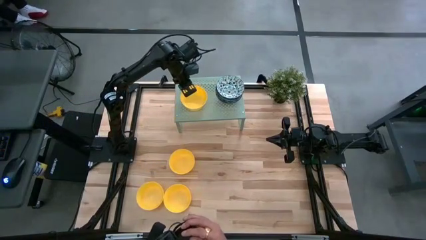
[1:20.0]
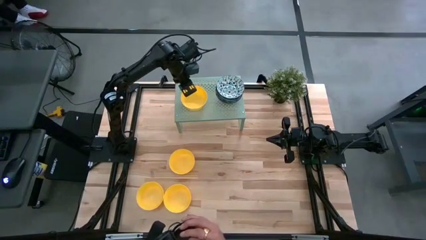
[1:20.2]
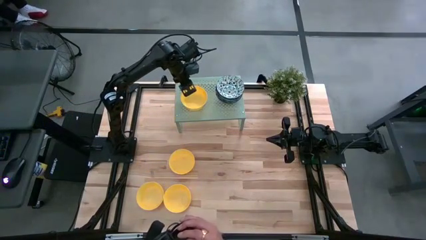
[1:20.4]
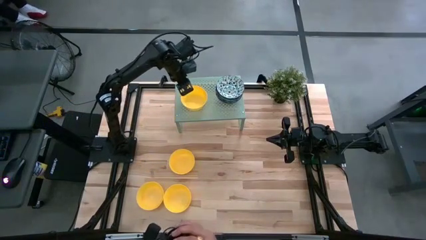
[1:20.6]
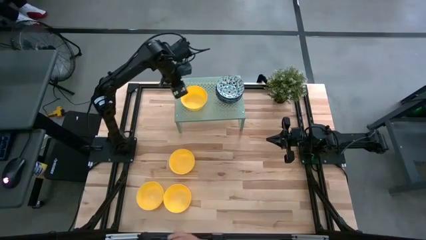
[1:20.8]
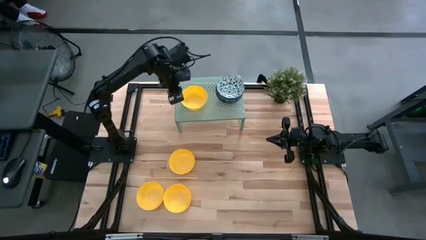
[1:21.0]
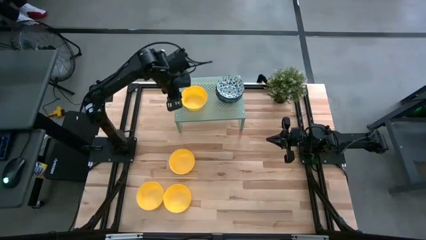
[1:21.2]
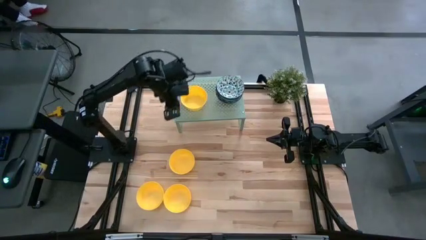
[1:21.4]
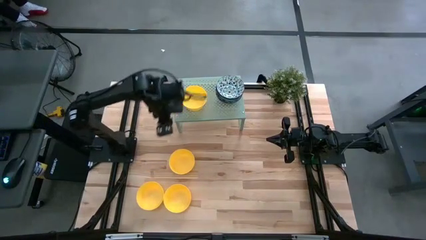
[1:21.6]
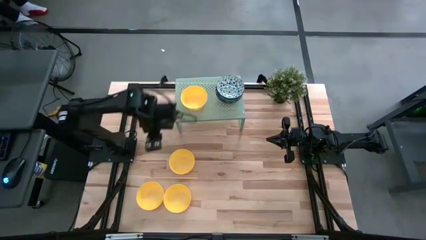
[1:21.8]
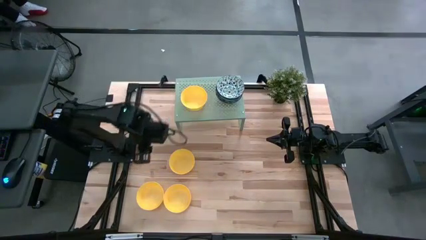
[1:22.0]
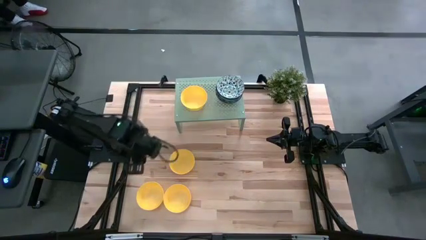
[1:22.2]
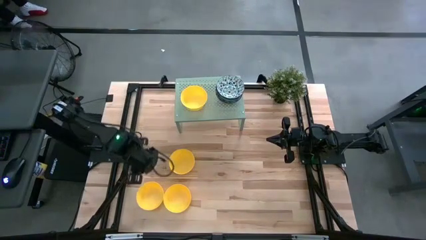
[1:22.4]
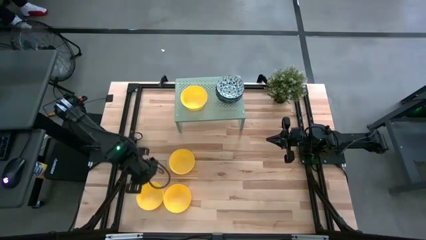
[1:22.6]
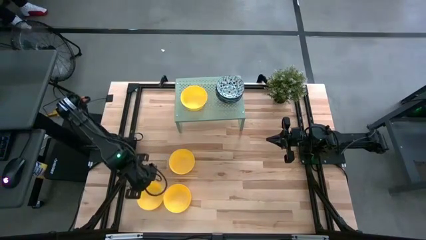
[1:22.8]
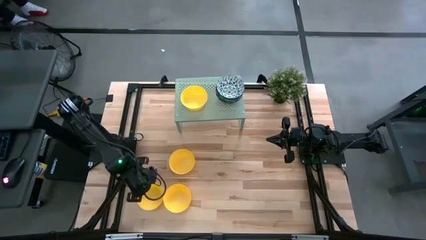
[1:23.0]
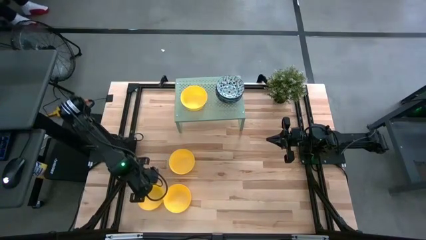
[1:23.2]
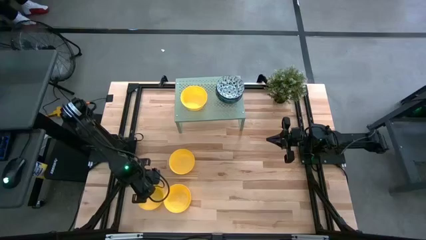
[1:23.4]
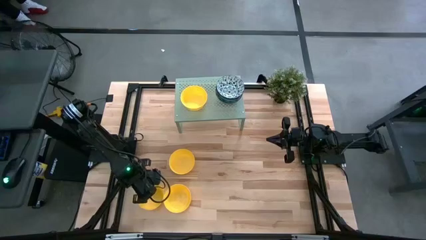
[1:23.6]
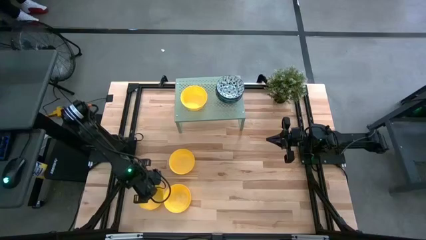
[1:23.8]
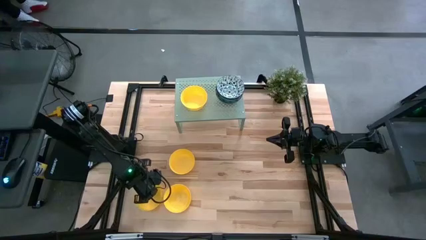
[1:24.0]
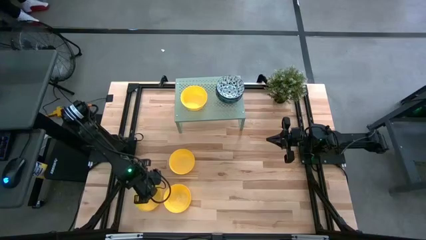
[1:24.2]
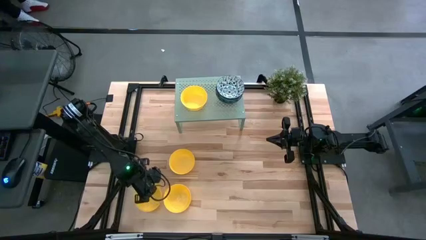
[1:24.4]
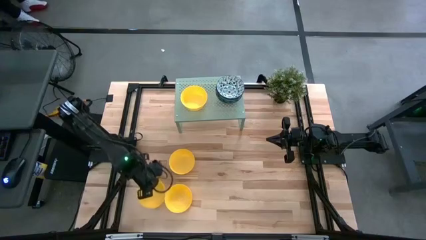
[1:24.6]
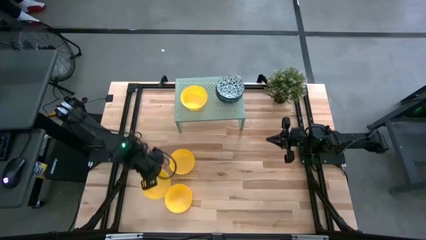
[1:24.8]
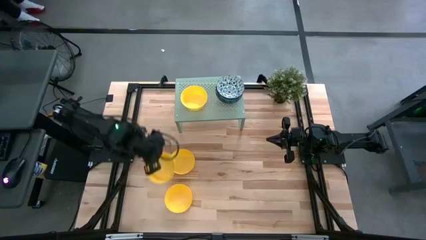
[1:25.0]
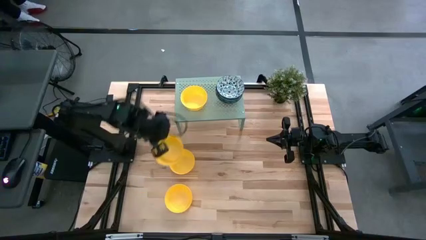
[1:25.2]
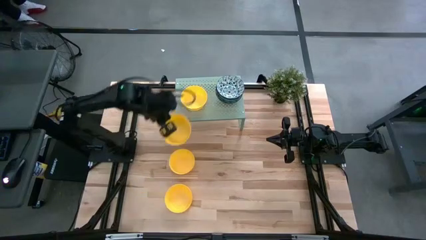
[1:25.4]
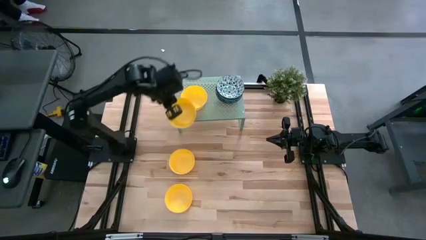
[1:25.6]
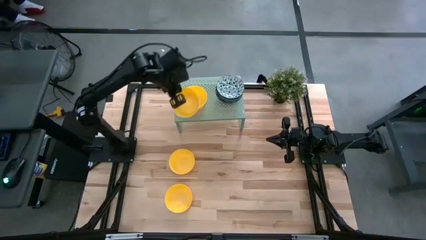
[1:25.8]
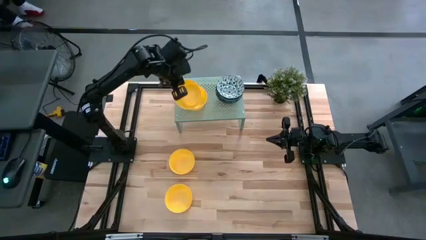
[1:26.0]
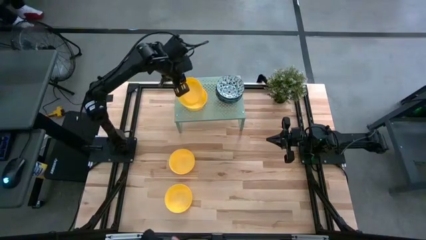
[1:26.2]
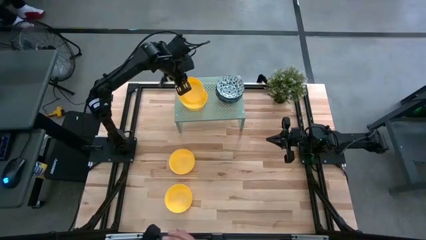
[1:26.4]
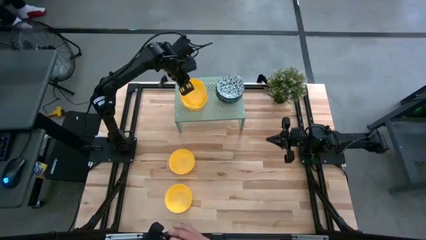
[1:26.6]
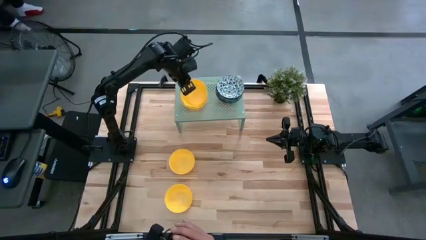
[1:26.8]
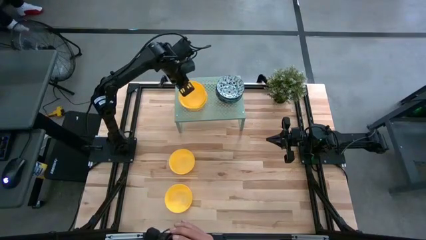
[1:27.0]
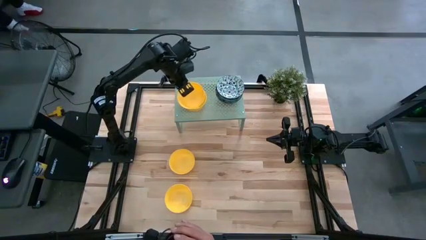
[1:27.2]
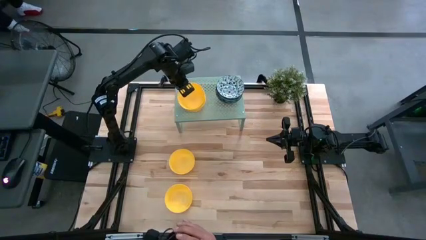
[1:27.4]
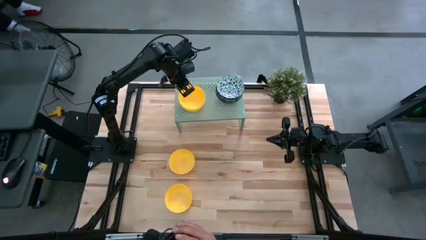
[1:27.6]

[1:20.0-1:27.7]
Task: Pick & Place Mini bowls
Stack the yellow bowl on top of the other yellow bowl on the shelf

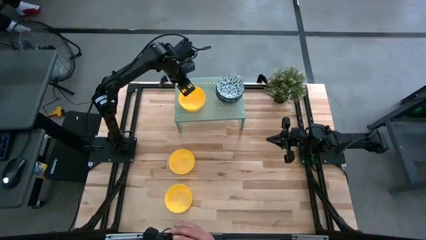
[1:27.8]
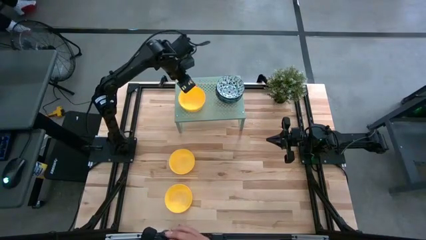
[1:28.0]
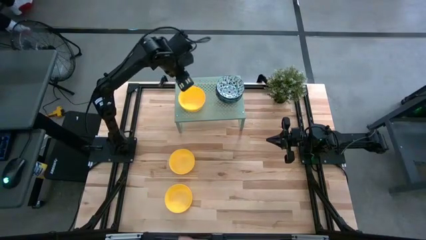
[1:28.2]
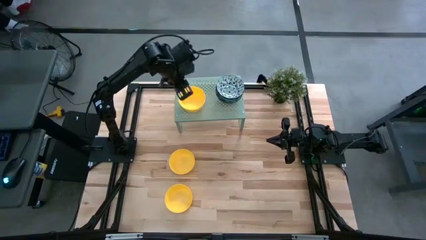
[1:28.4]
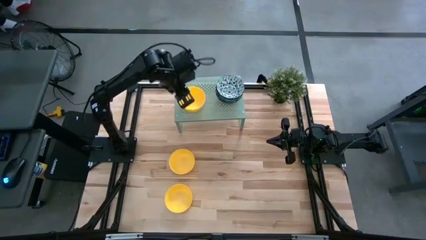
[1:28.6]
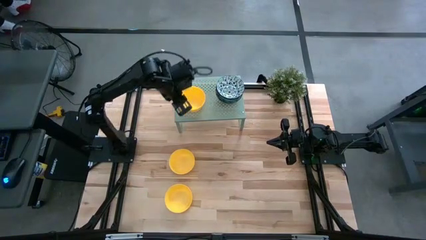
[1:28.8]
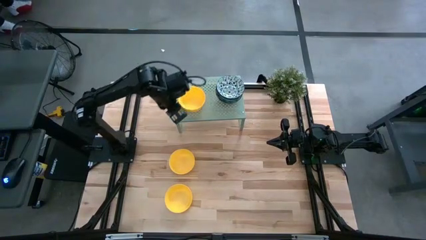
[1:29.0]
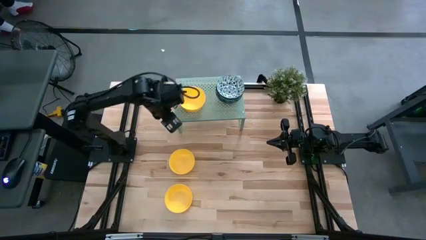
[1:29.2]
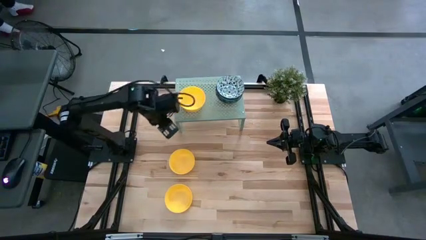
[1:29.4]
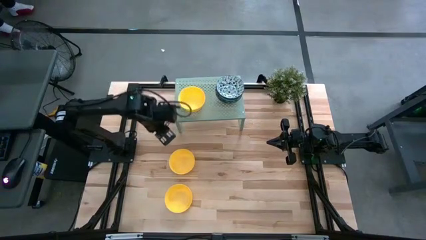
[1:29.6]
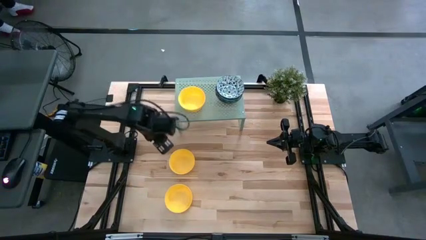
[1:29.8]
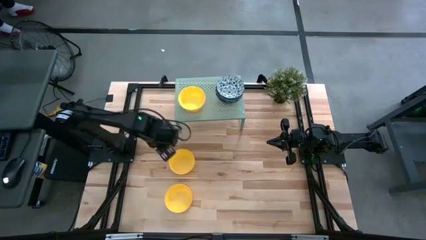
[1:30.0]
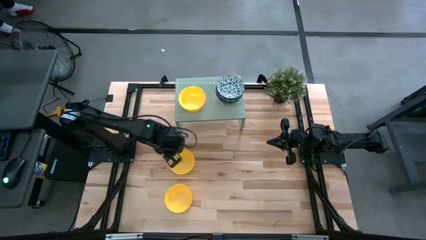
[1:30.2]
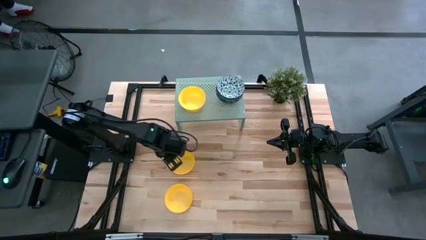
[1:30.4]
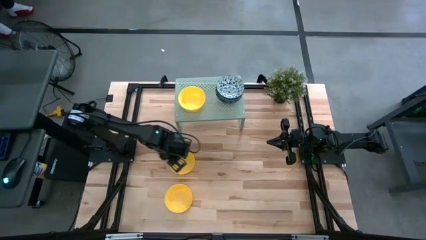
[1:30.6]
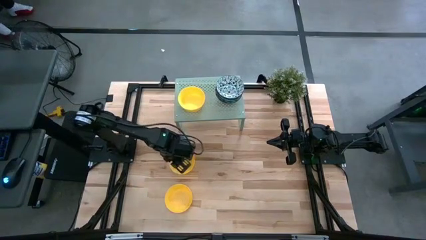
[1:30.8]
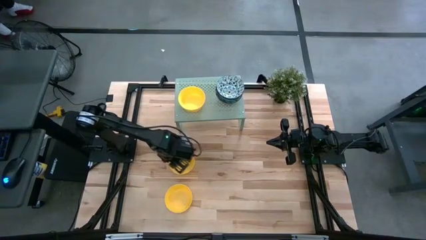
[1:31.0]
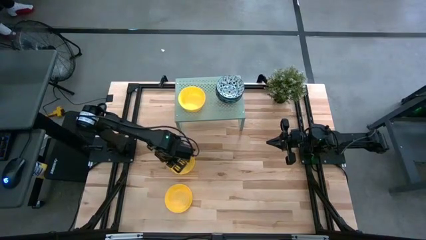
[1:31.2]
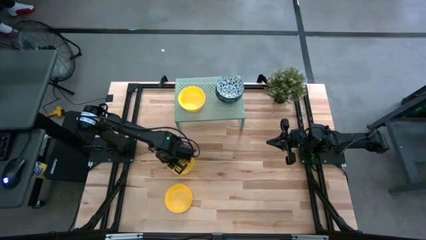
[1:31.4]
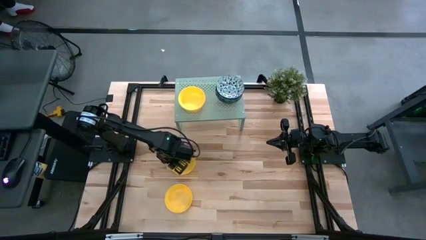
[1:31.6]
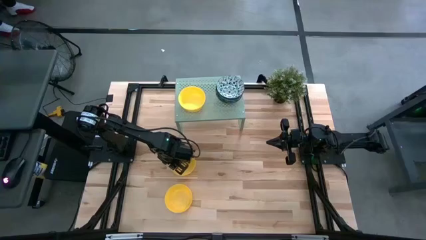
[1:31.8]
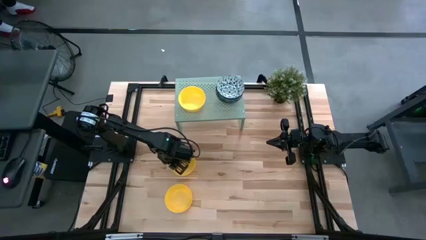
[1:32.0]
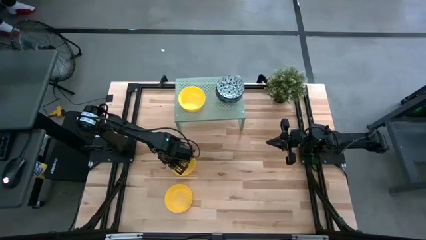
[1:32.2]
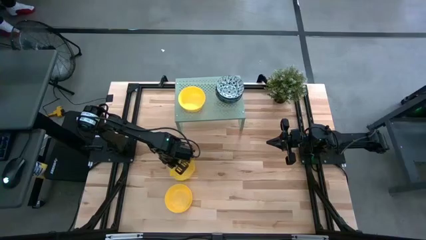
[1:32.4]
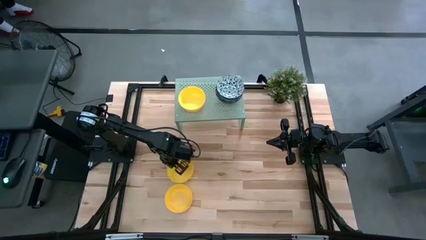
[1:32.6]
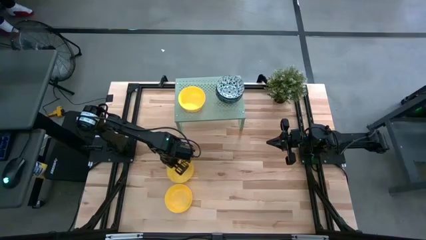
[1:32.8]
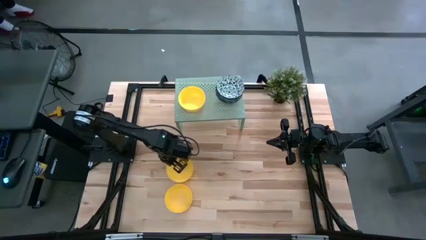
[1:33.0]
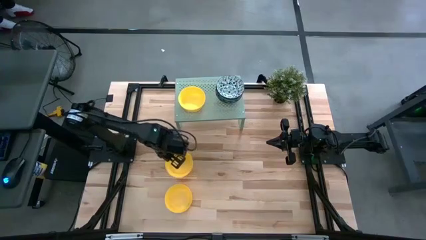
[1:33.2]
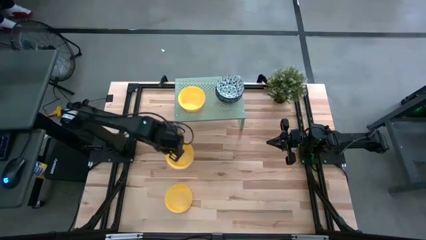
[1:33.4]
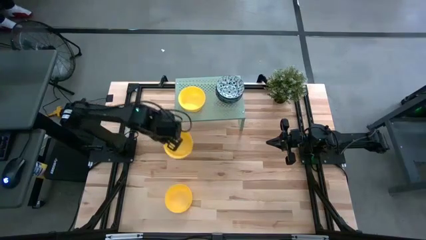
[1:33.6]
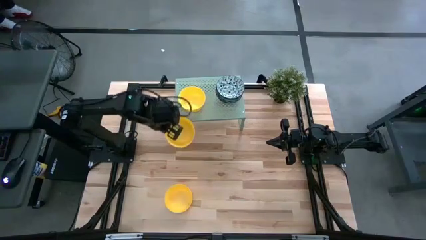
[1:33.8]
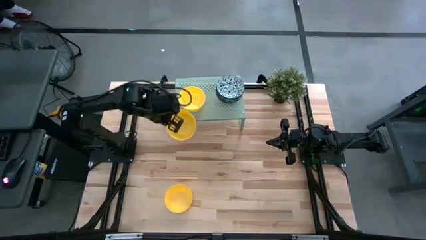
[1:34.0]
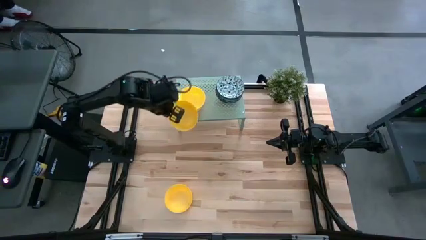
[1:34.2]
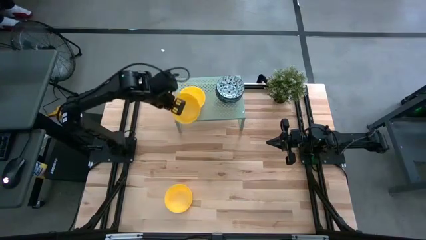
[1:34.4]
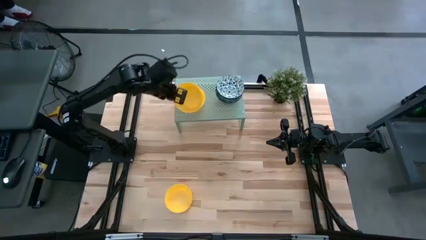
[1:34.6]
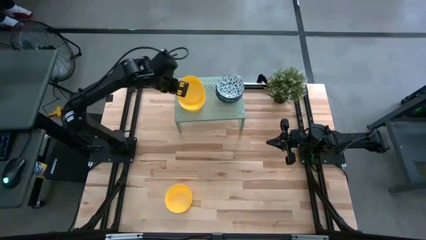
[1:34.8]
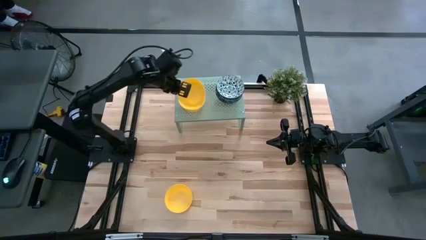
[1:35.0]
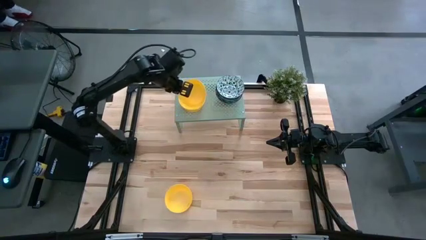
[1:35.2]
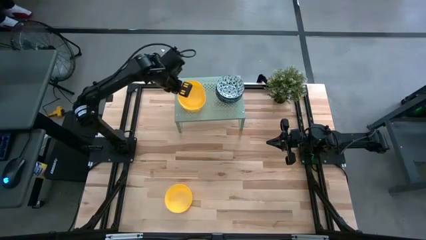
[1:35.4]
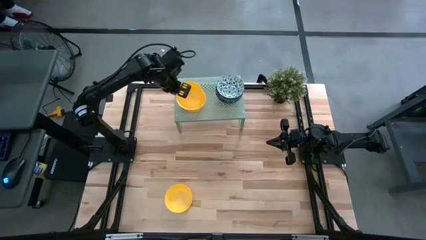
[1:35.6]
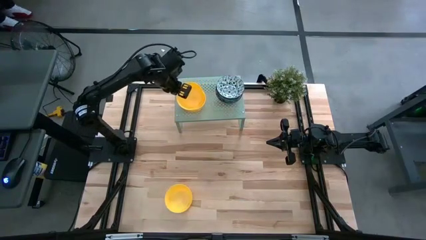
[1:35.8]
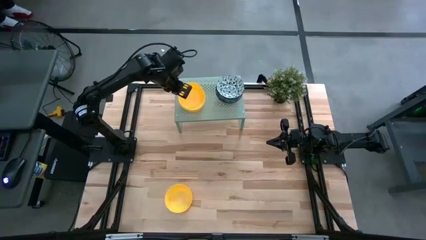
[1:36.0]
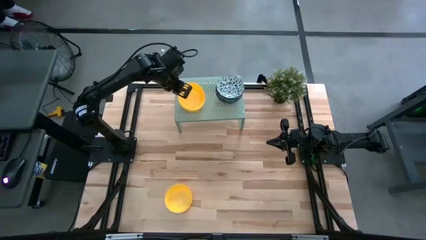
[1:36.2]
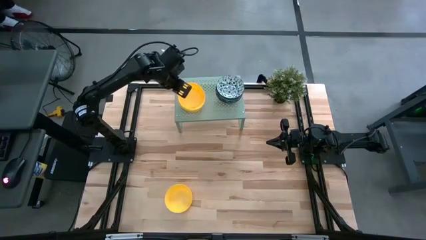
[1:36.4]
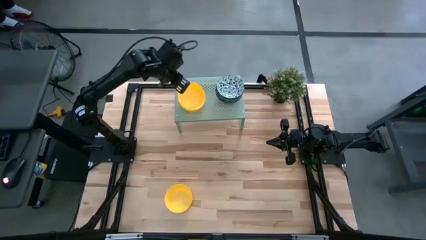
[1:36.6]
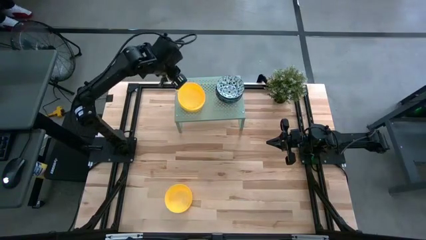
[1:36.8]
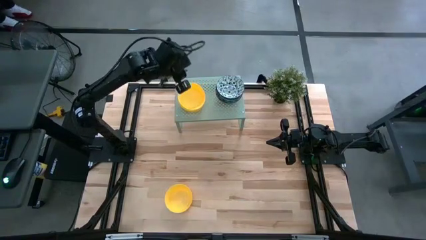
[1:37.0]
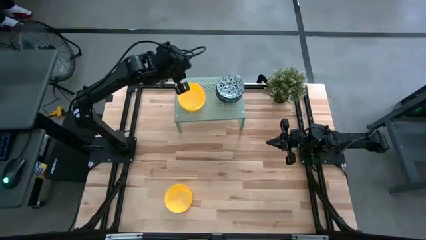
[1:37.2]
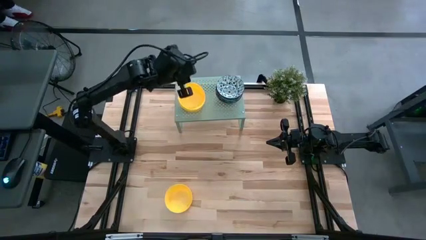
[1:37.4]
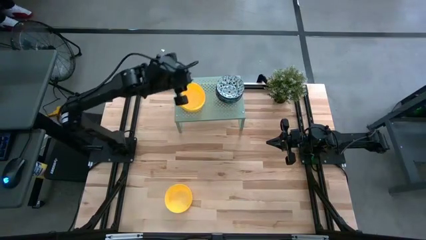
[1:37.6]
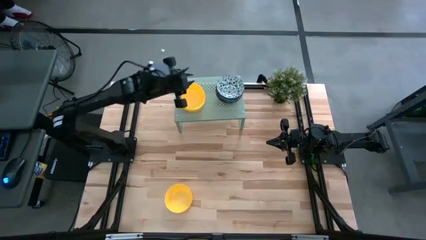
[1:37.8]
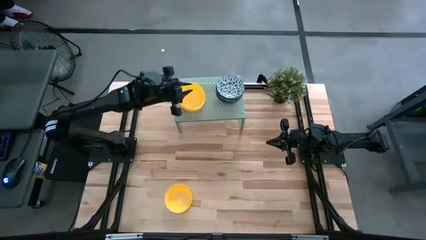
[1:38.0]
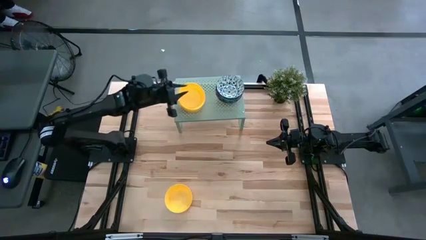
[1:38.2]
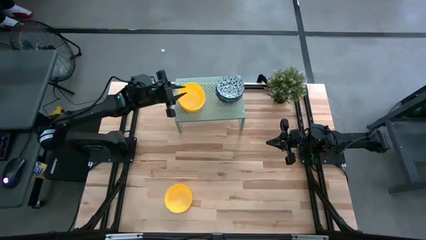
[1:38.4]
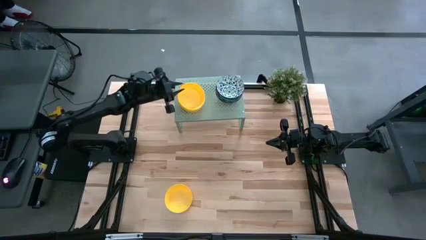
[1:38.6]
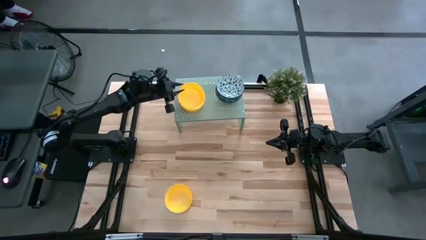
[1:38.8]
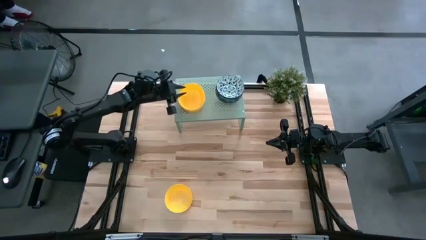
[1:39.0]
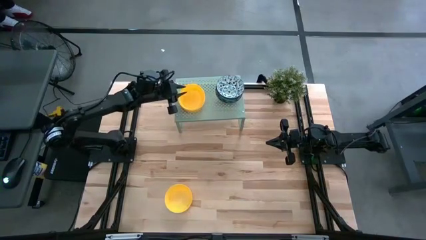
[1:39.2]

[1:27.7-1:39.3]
Stack the yellow bowl on top of the other yellow bowl on the shelf
